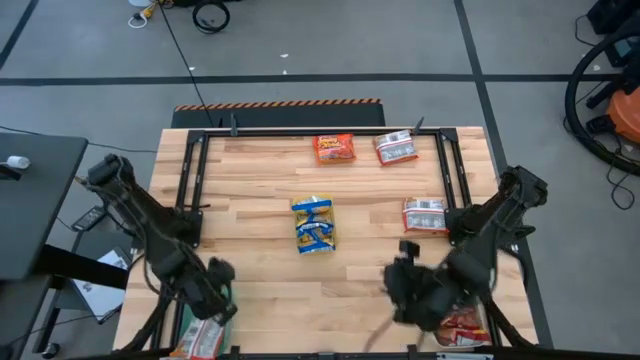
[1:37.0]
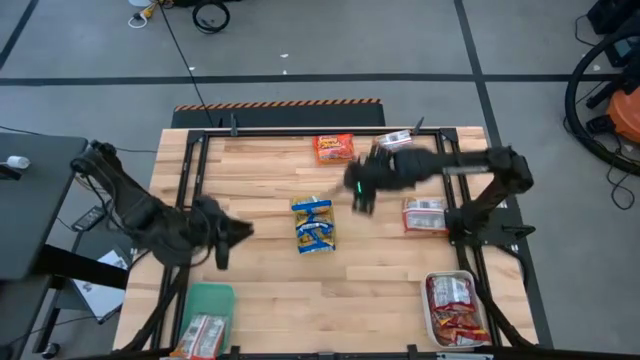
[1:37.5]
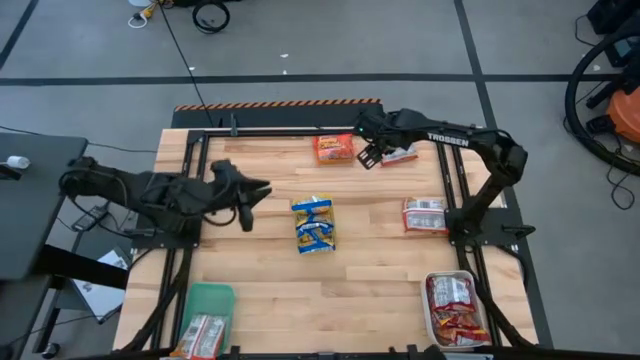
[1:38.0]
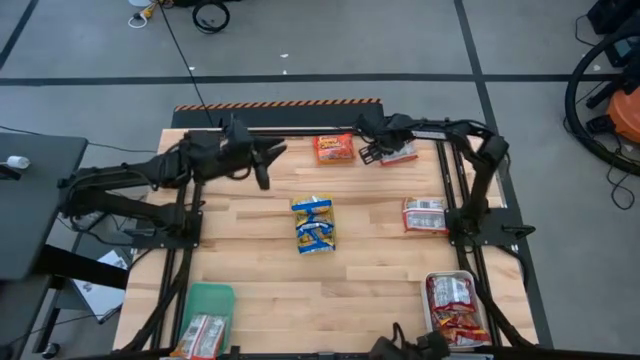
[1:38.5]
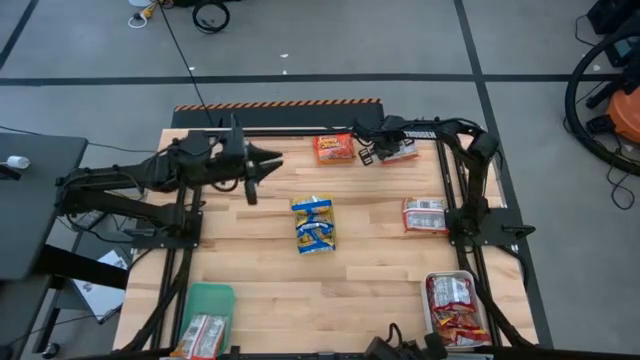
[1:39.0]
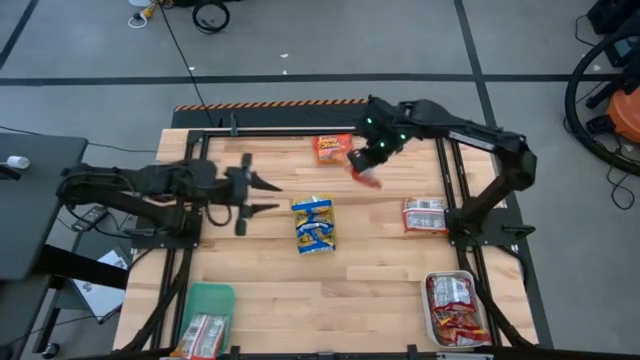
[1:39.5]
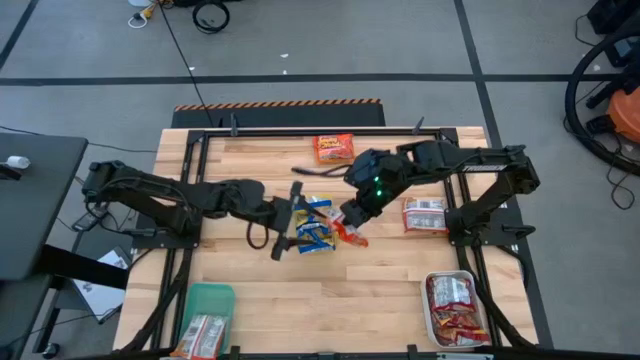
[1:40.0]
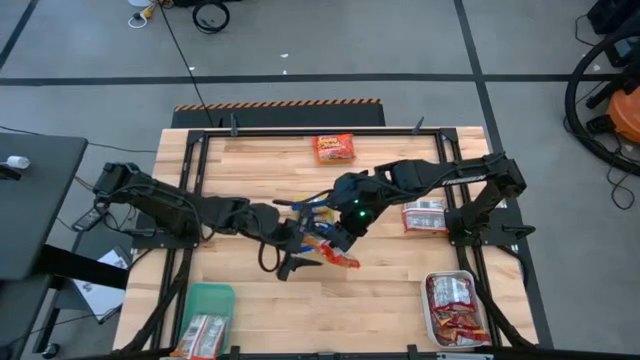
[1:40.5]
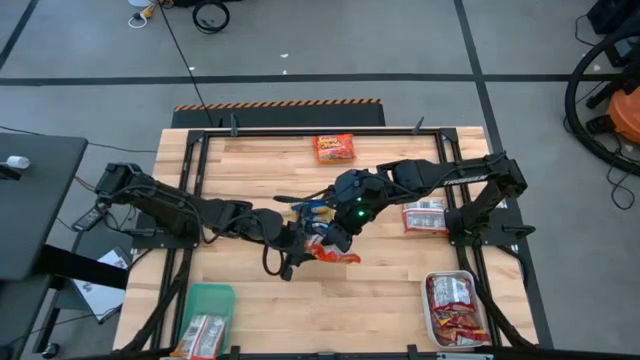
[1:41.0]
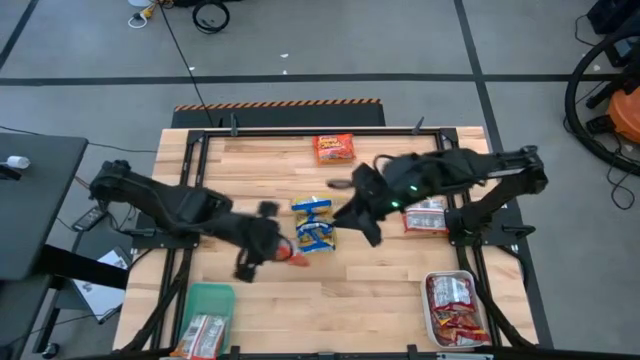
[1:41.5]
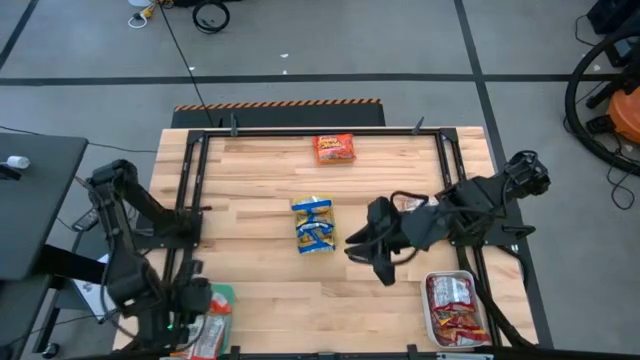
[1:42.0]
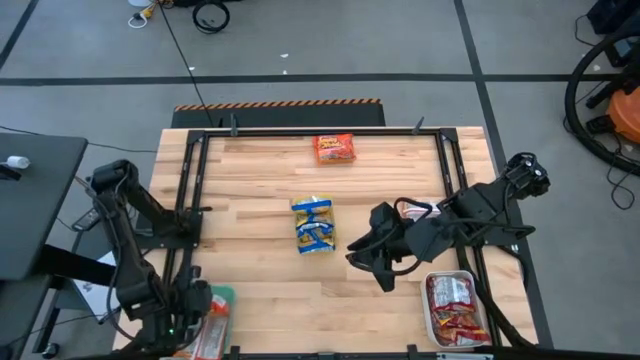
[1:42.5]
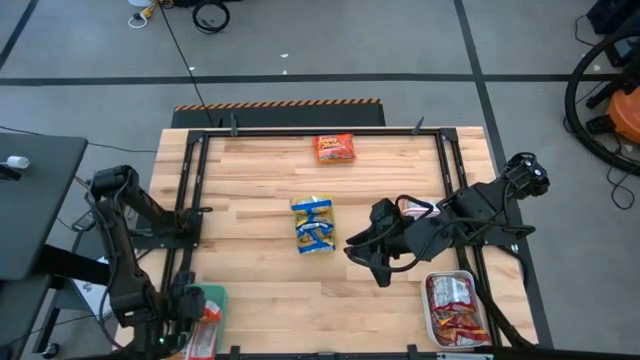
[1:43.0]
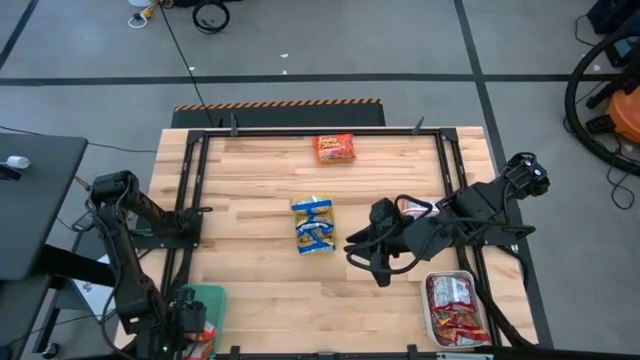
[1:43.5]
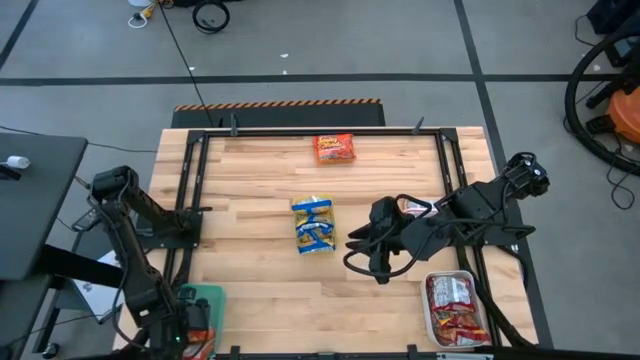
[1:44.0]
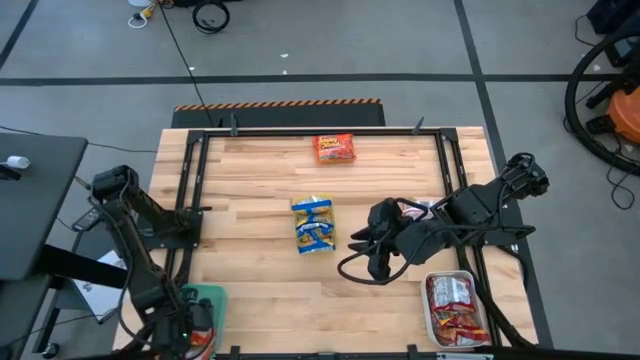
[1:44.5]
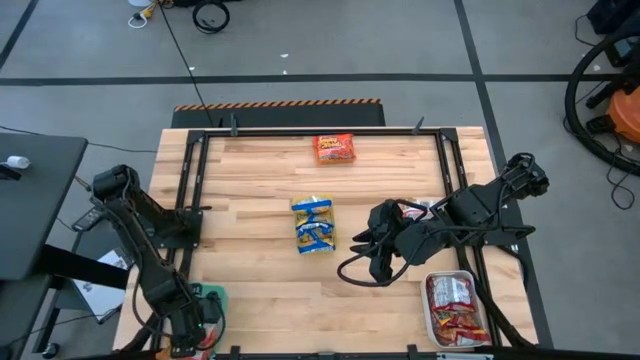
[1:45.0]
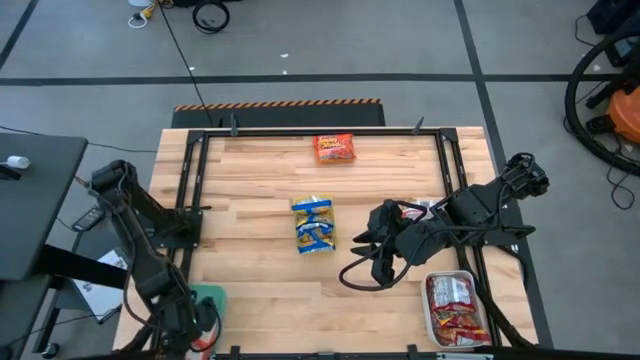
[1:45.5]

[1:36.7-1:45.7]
Task: Sort Maruchan noodles
Put the orange noodle pack into the green bin

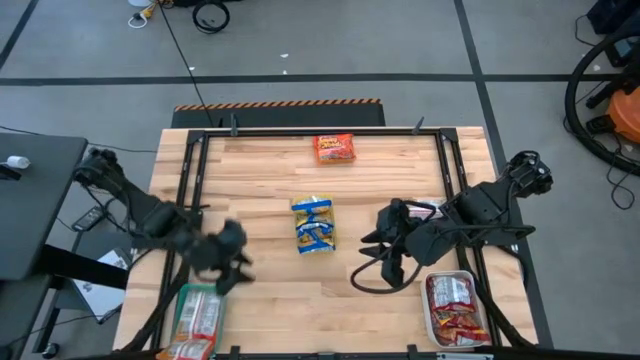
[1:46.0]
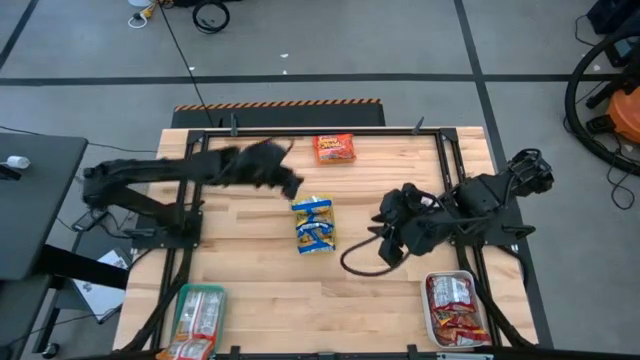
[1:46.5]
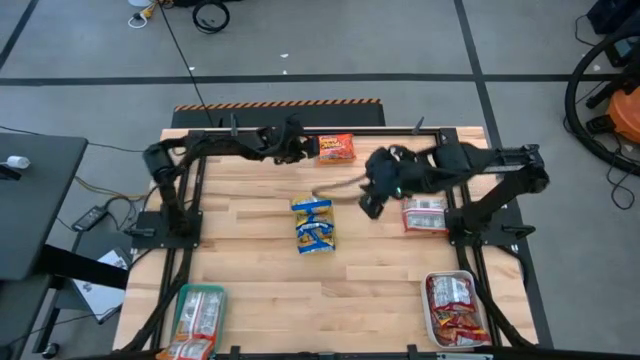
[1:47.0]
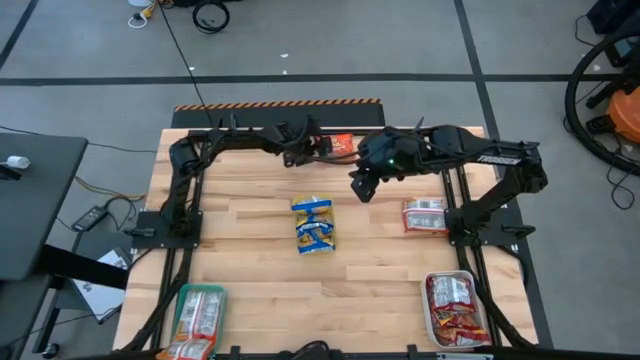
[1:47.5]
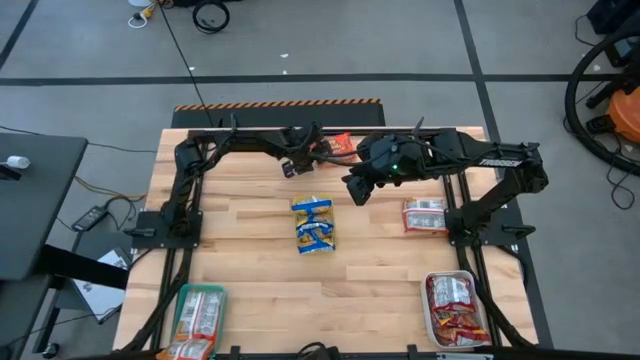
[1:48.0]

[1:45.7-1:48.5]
Put the orange noodle pack into the green bin

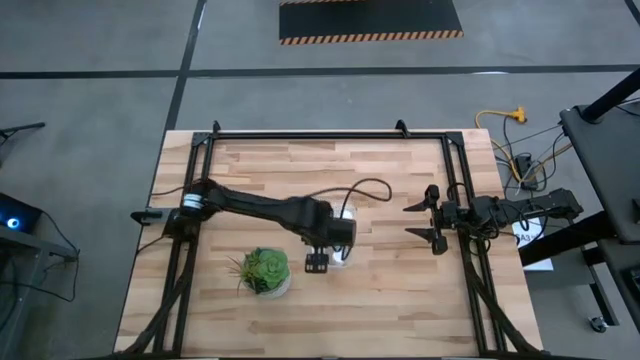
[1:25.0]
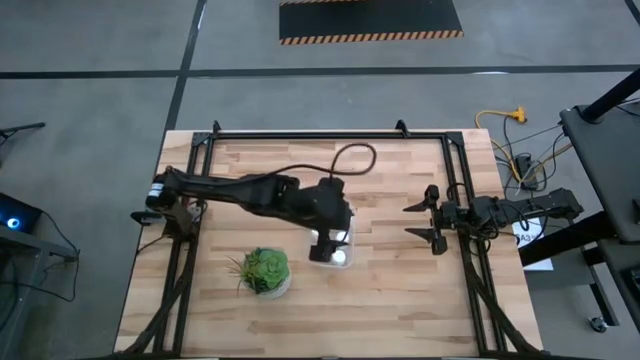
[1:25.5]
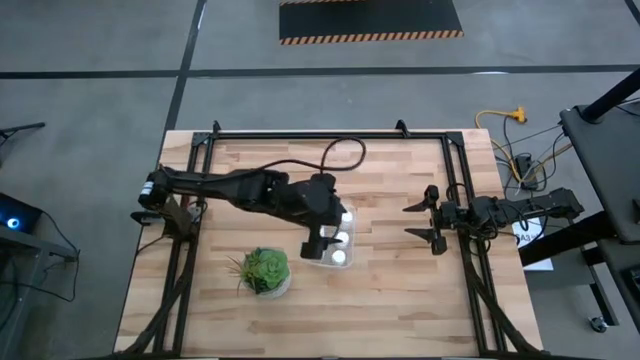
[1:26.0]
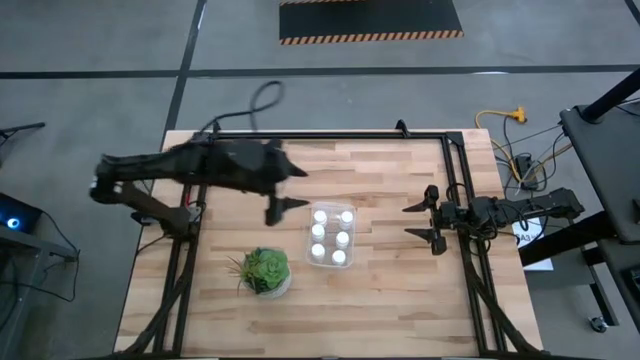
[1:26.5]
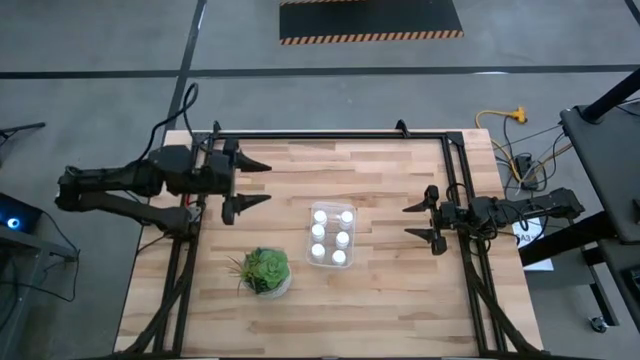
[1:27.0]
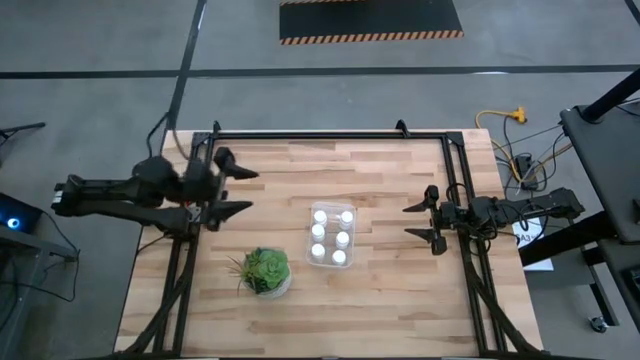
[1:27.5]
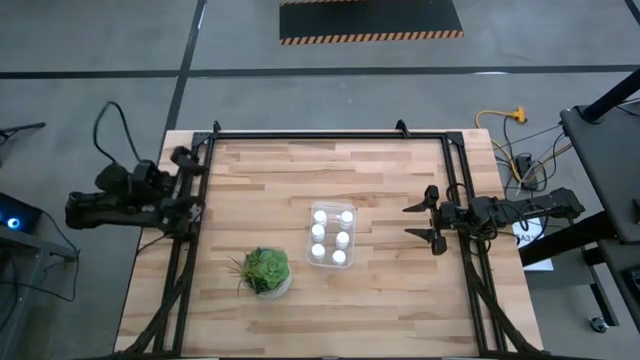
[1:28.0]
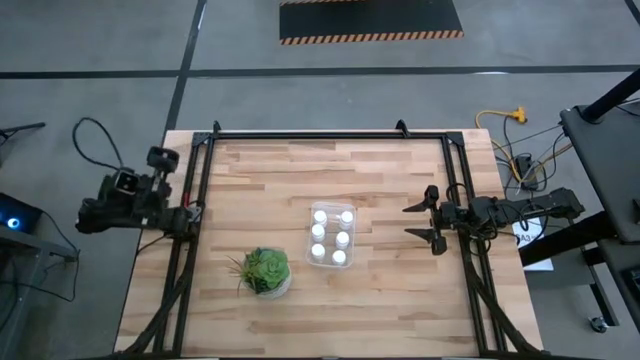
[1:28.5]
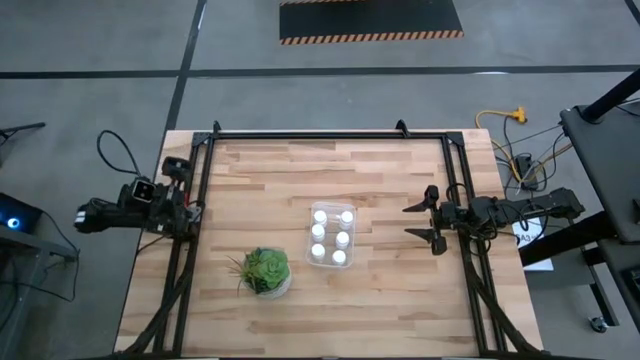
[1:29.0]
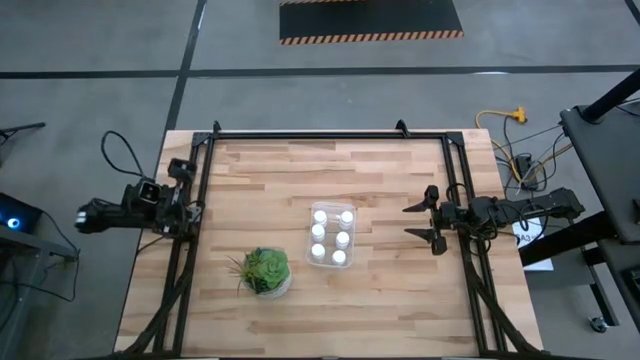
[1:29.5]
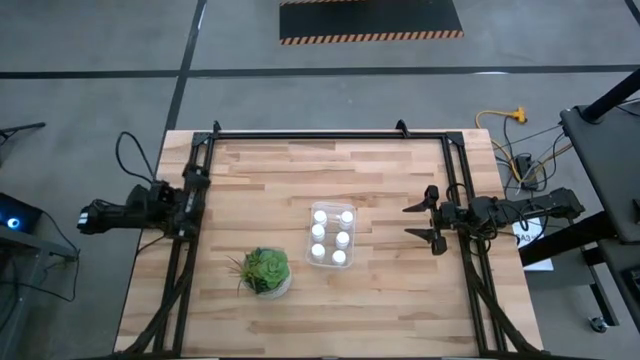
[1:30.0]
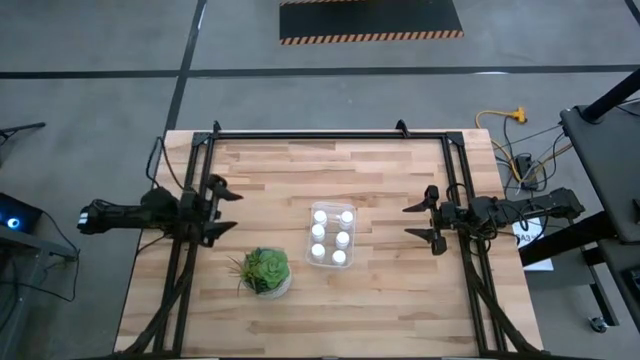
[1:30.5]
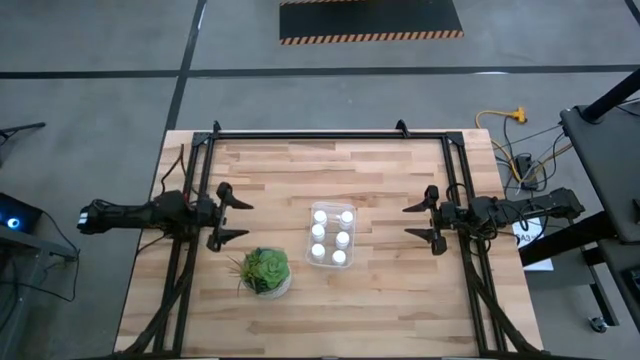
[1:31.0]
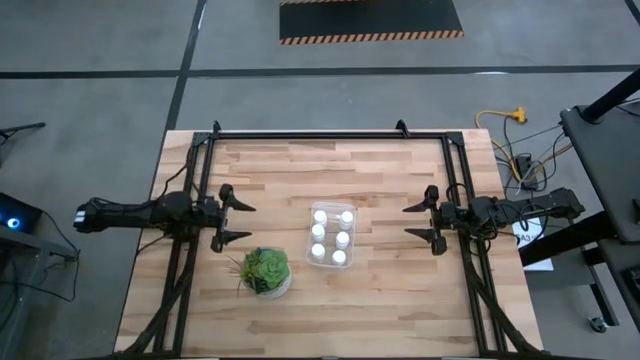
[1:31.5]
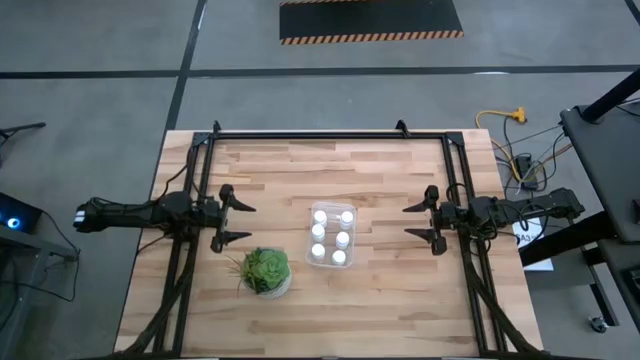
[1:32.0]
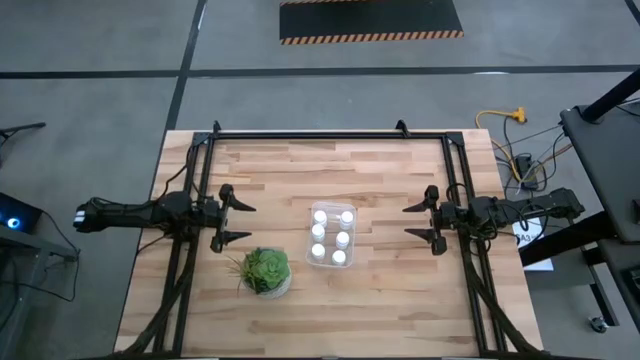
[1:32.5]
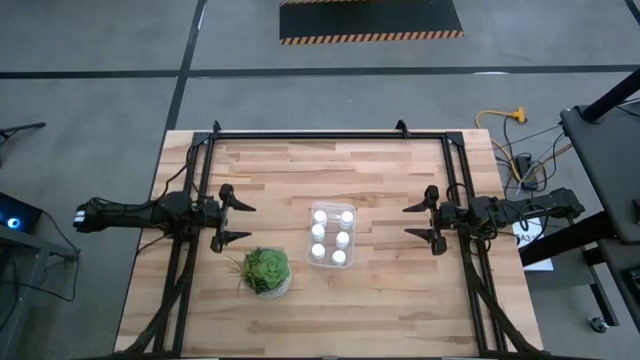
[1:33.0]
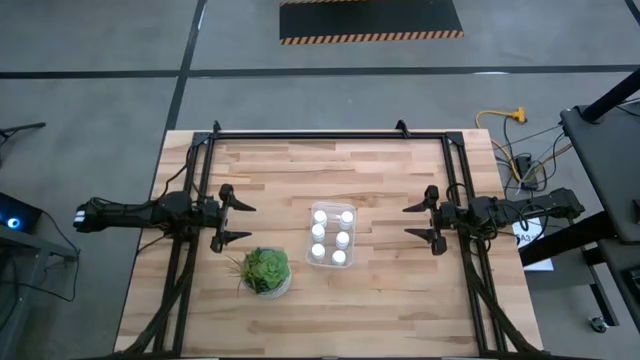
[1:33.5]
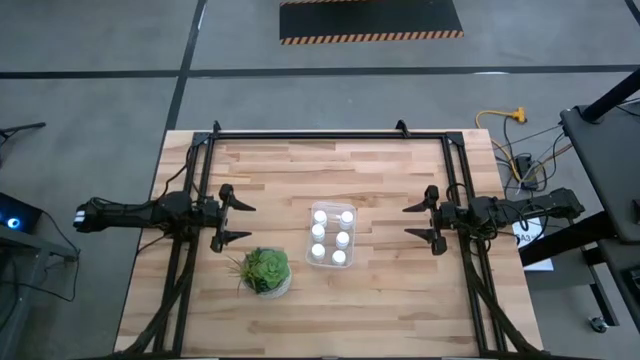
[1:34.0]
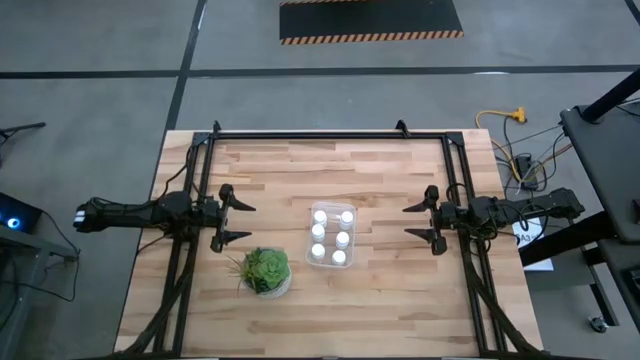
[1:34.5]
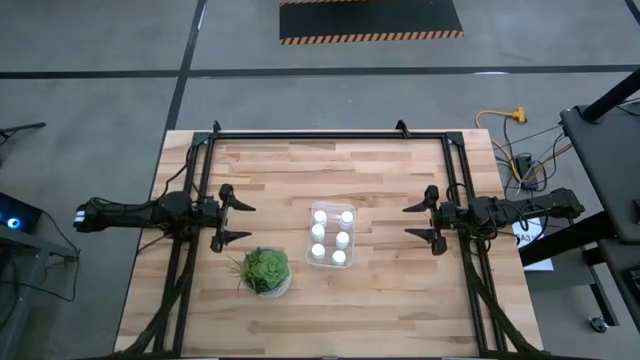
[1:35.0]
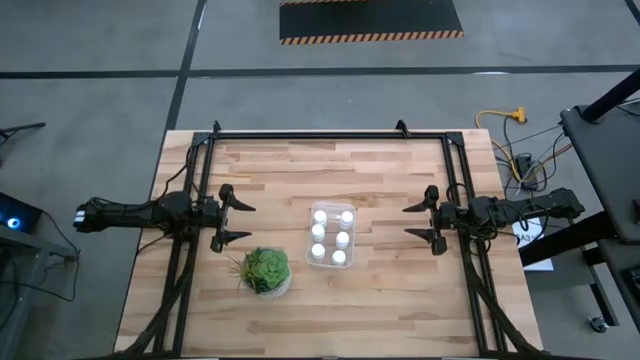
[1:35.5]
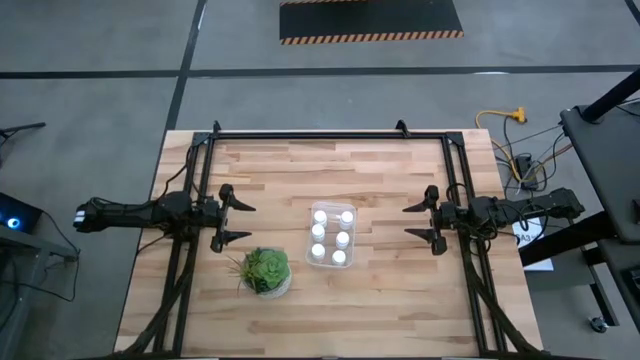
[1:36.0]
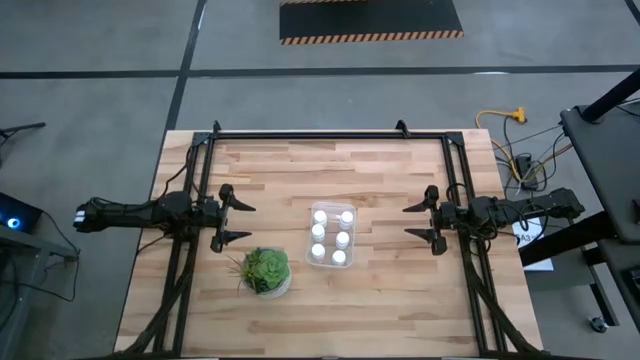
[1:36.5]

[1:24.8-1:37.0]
Task: Pick and place pill bottles into a basket
Return to Home Position
